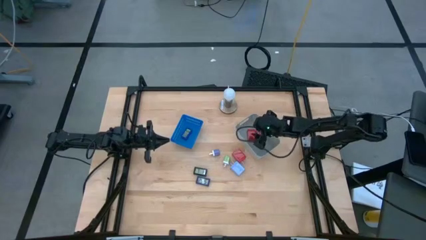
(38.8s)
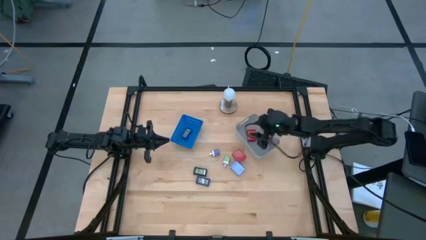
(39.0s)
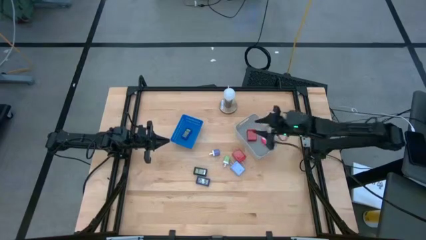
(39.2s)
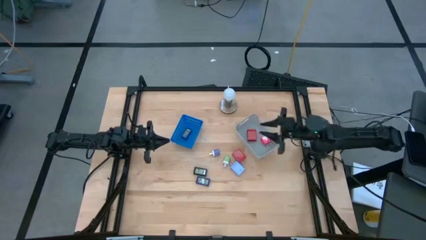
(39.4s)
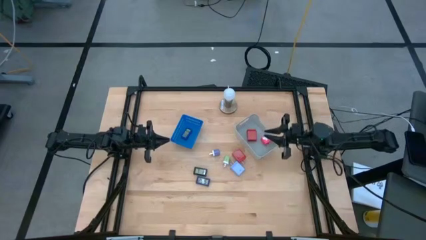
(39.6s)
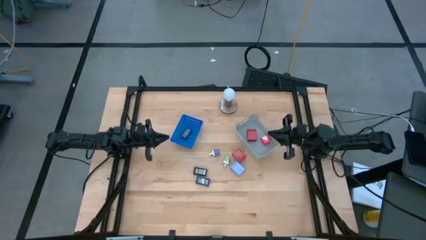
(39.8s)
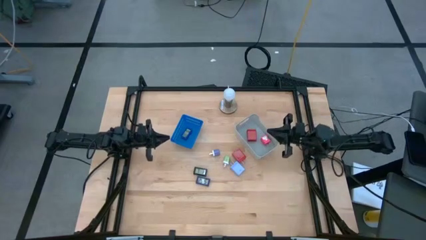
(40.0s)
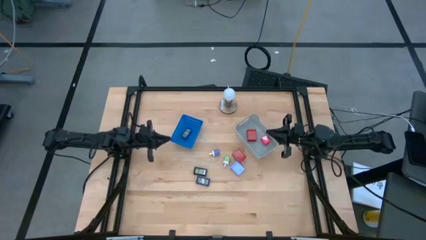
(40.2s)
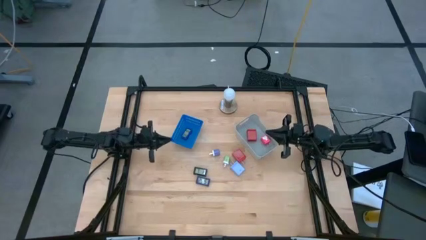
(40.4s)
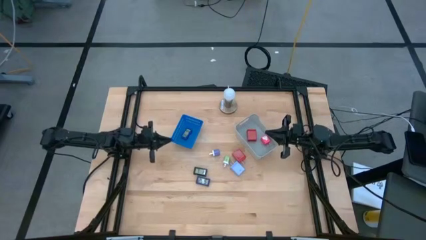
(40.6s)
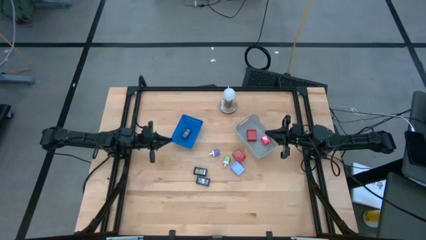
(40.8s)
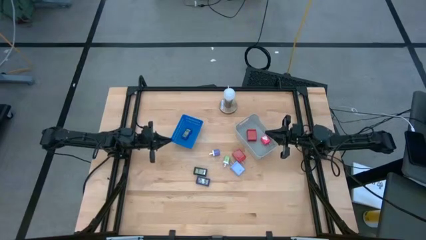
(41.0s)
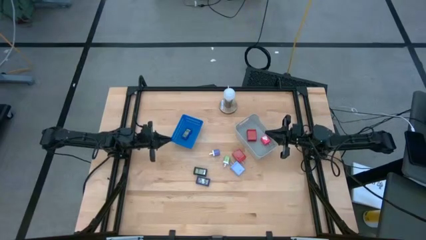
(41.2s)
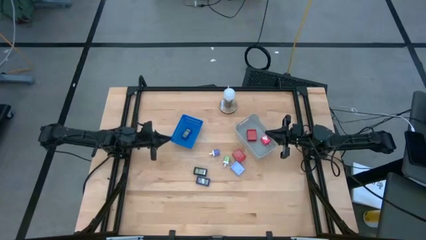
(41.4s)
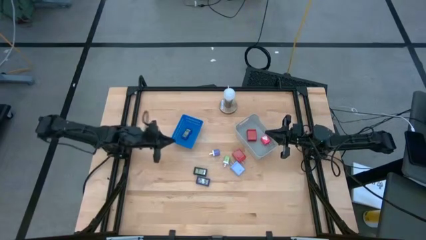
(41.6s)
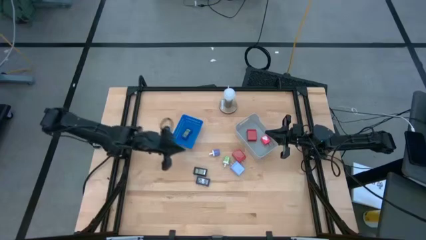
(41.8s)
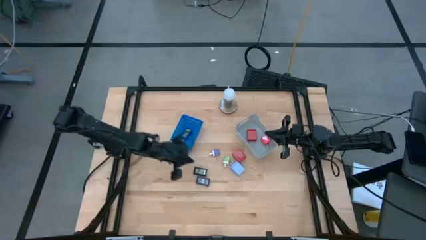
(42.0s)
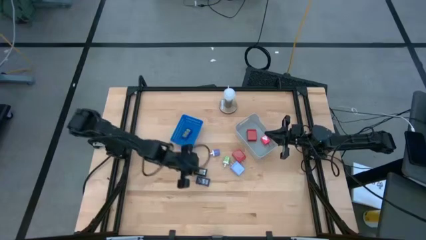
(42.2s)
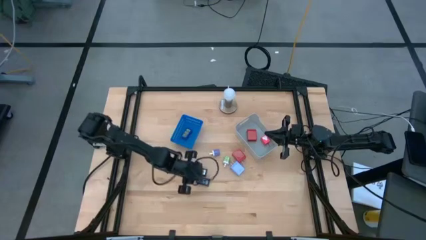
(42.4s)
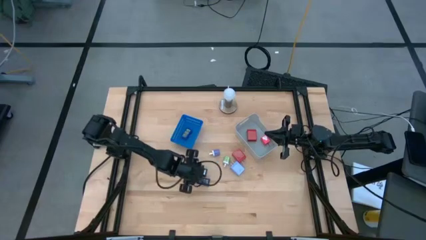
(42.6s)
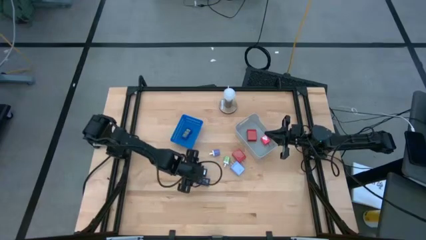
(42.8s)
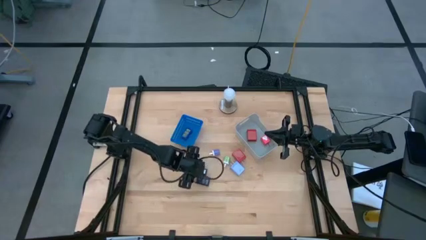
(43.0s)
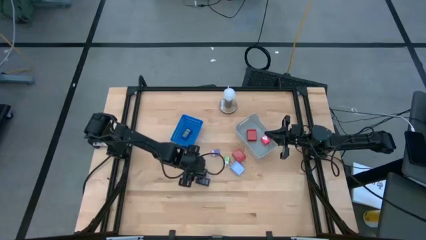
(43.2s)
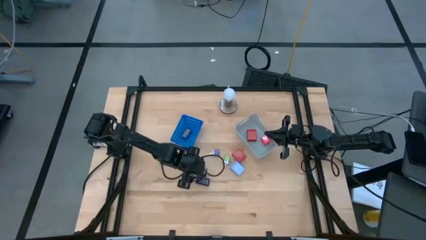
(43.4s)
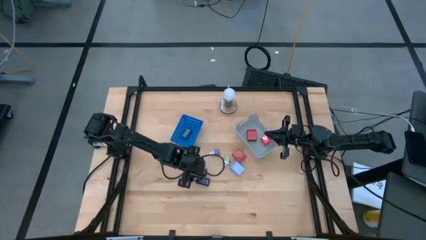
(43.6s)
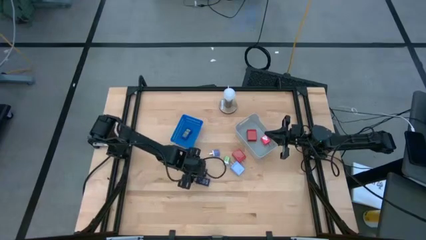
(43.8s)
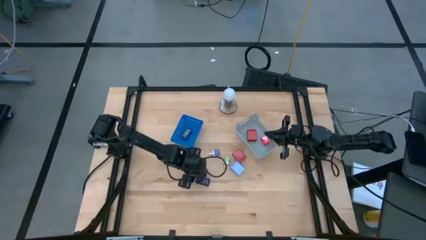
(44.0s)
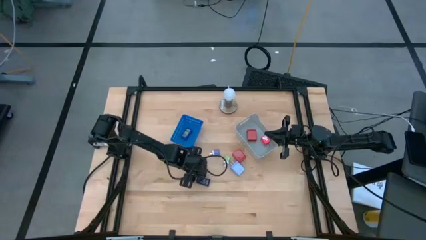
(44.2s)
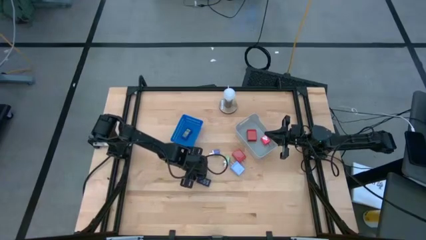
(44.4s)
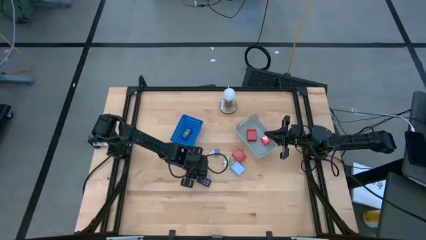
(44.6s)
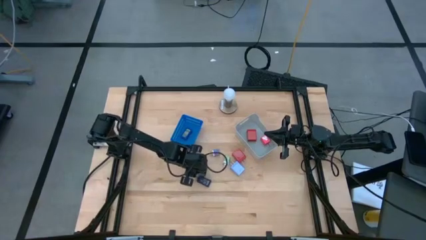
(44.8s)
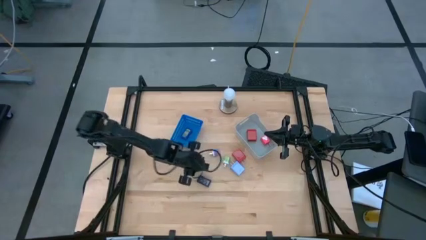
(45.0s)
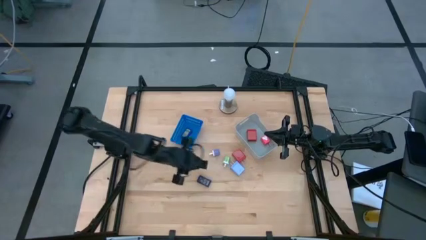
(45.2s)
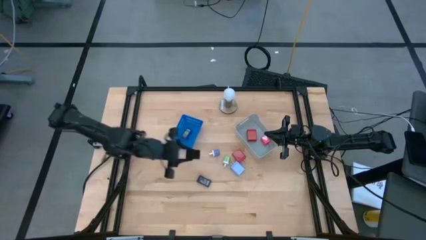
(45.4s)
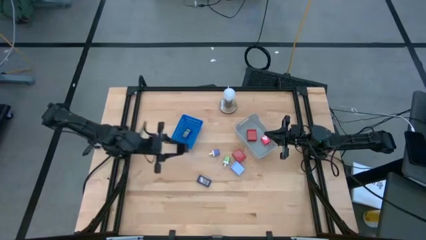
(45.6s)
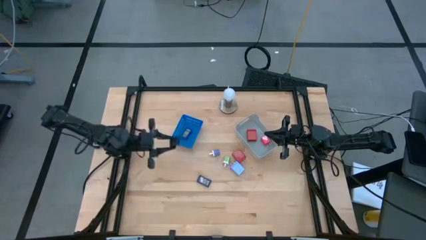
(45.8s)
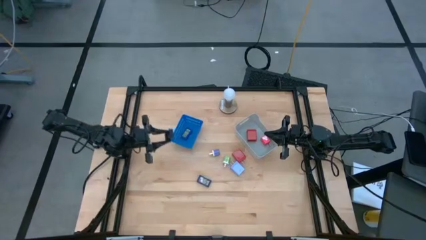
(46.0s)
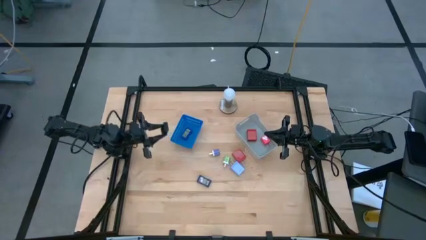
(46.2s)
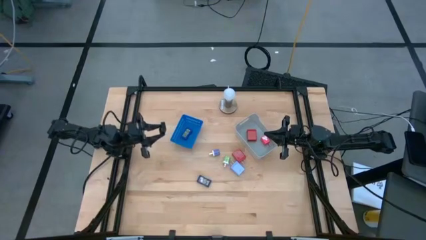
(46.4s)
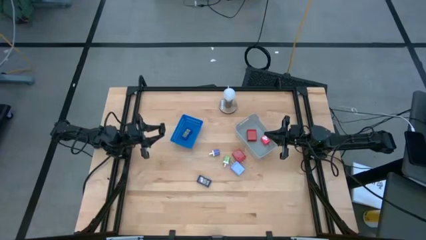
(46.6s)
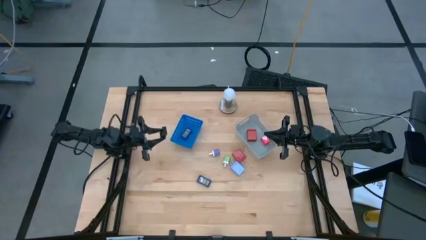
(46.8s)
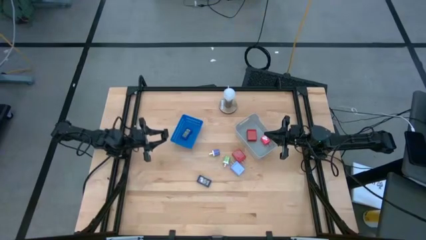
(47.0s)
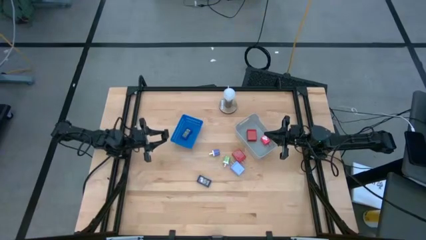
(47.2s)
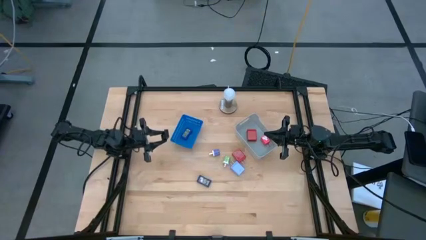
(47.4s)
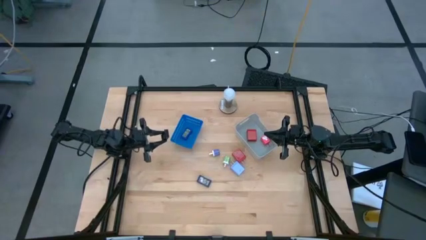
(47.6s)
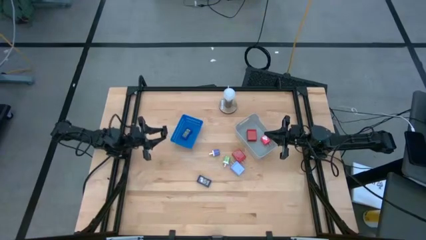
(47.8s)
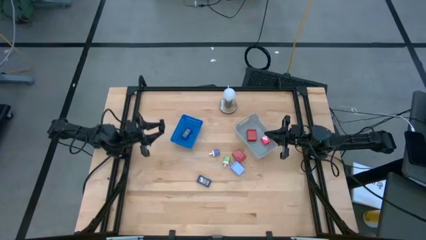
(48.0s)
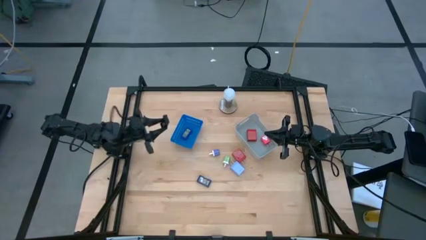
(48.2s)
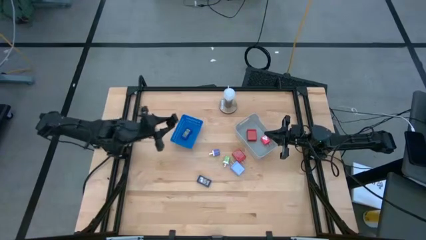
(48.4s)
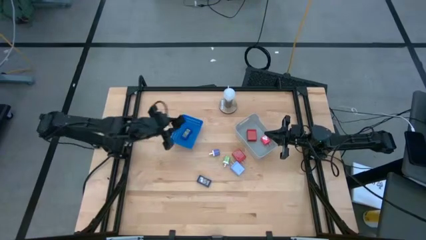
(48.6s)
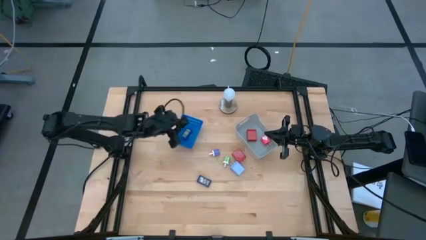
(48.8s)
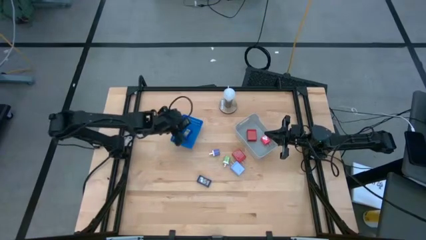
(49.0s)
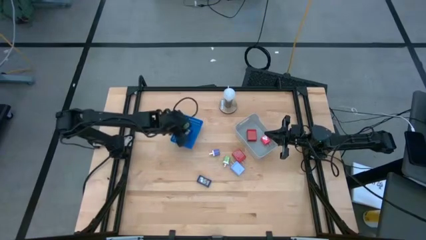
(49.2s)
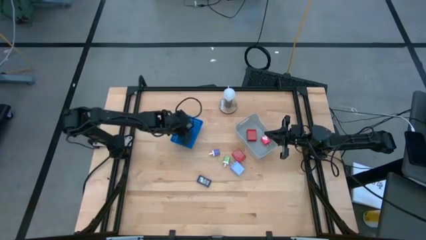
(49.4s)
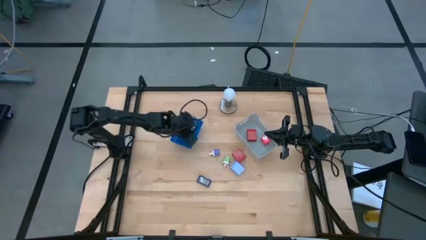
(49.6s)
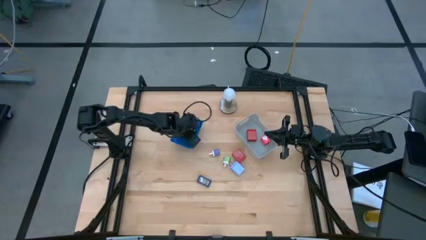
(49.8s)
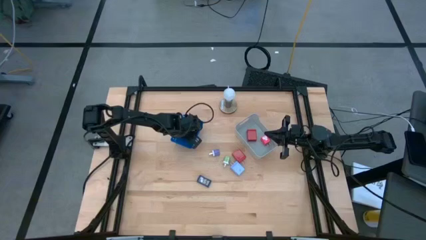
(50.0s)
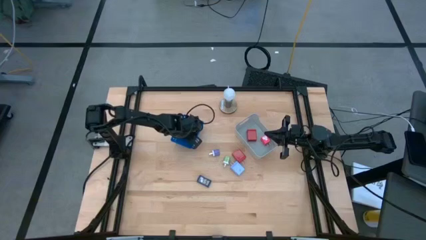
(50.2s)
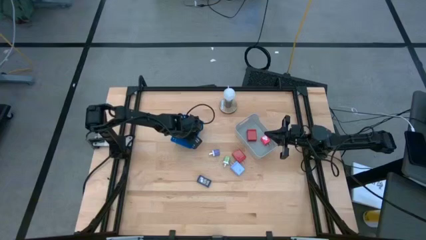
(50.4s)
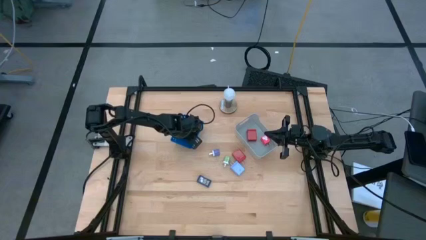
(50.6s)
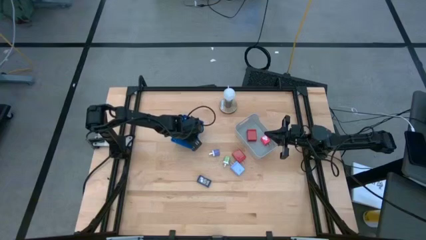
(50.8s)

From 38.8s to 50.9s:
Task: Pick & Place Office items
Put the black timer into the blue bin

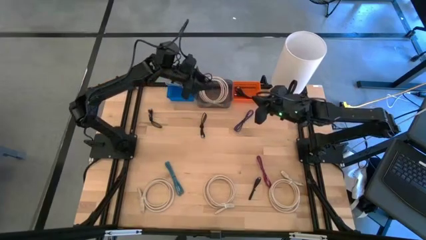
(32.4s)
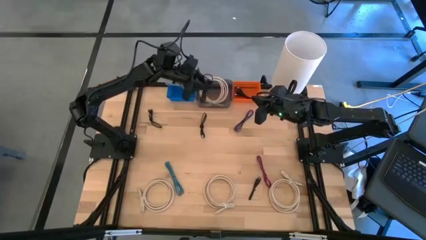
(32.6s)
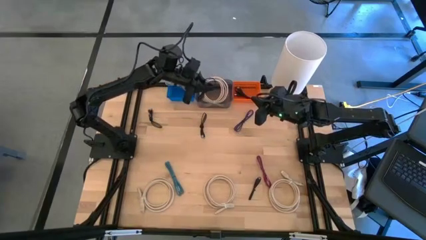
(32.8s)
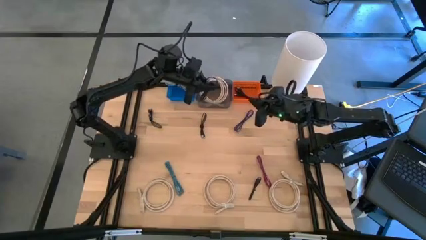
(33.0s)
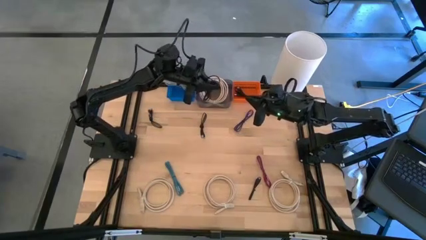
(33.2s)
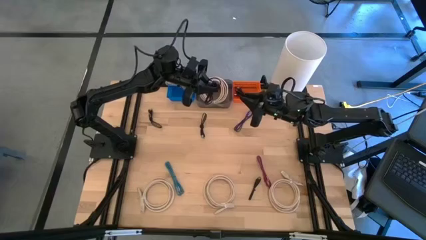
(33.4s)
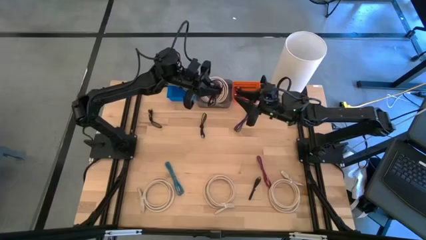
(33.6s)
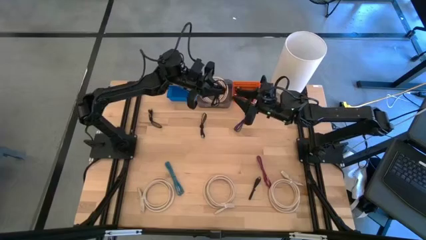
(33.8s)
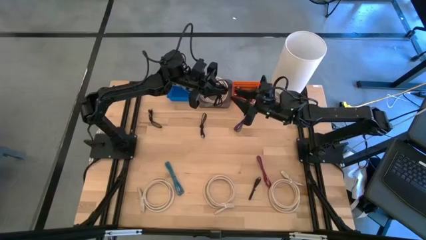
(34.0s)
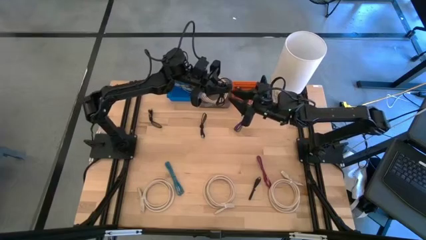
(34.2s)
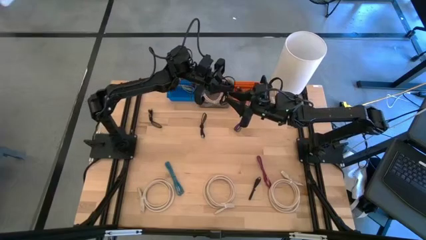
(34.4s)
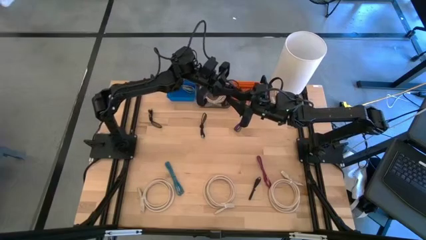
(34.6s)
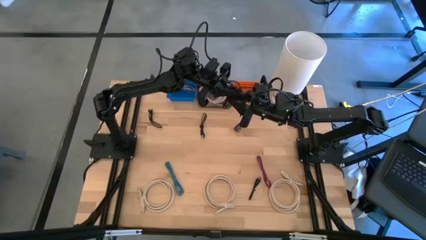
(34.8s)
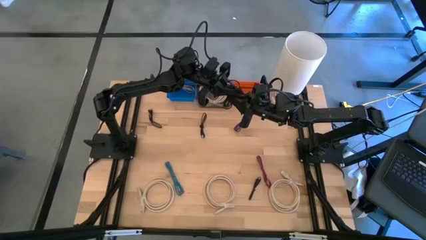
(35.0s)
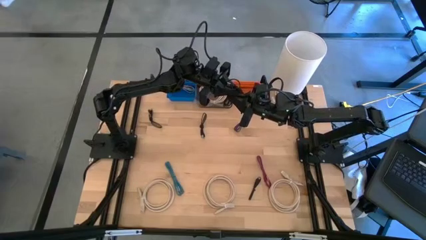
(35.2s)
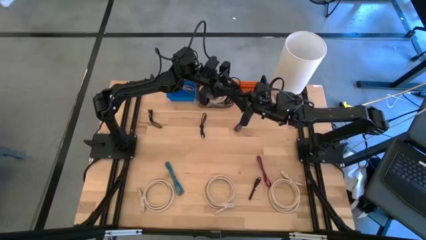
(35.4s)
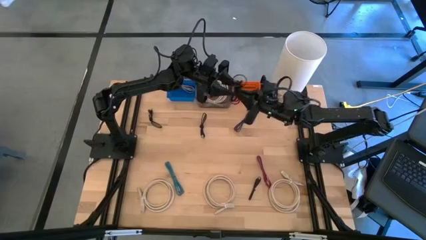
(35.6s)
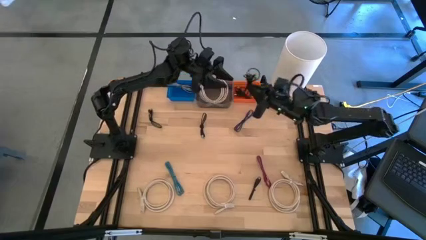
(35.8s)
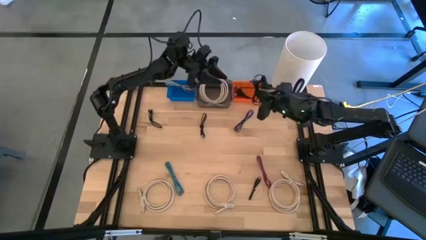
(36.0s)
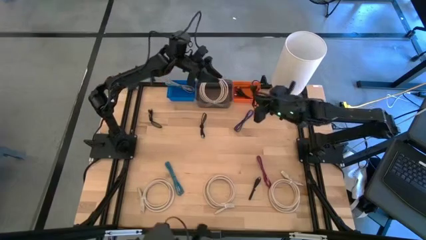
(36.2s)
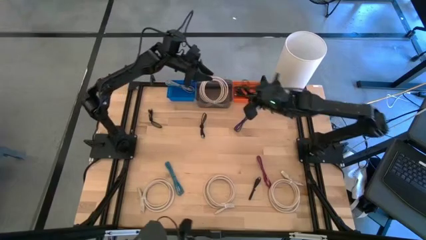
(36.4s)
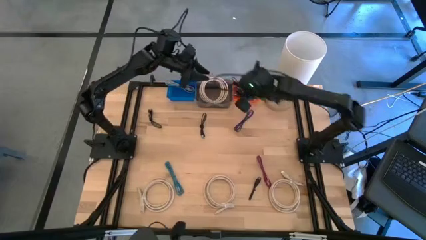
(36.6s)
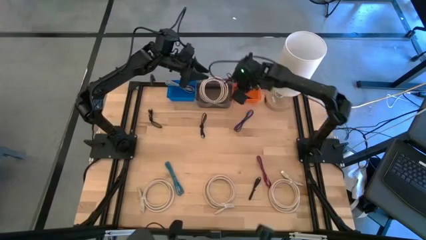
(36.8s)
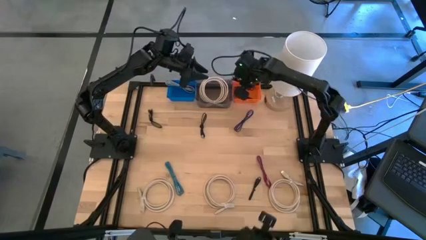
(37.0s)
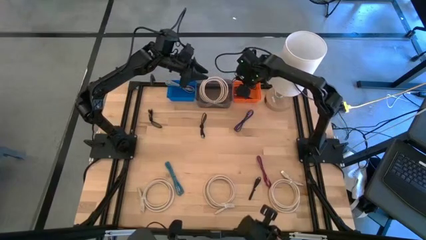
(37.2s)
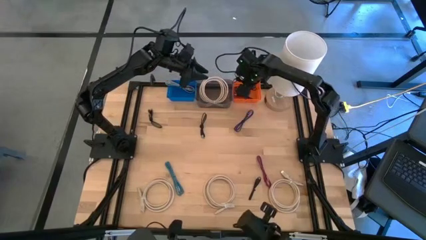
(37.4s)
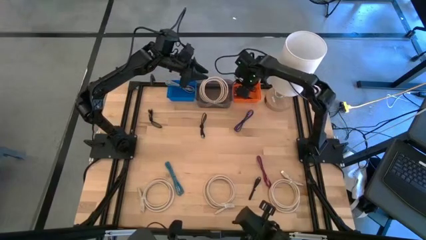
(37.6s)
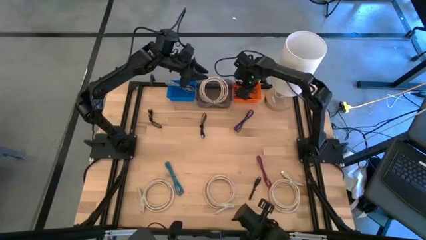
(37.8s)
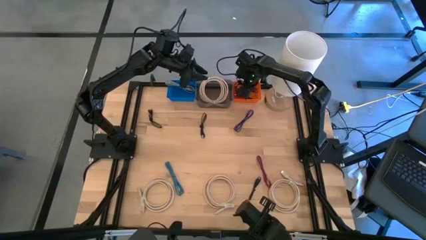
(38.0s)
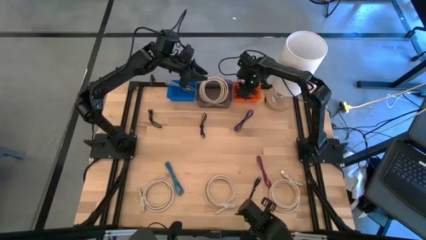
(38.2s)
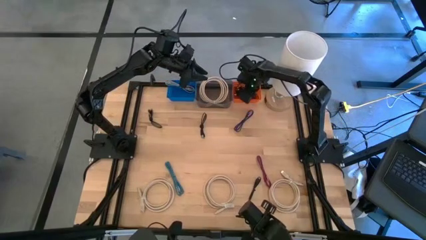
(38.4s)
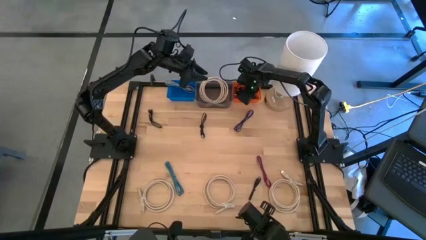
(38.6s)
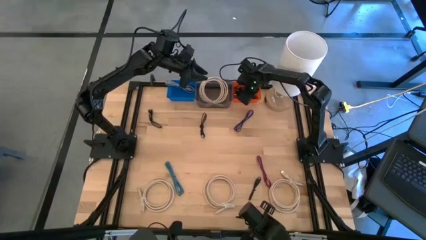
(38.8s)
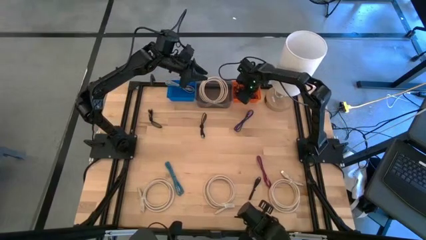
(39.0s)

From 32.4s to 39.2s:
Task: Pick & Place USB Port
Put the black charger cable into the orange bin
